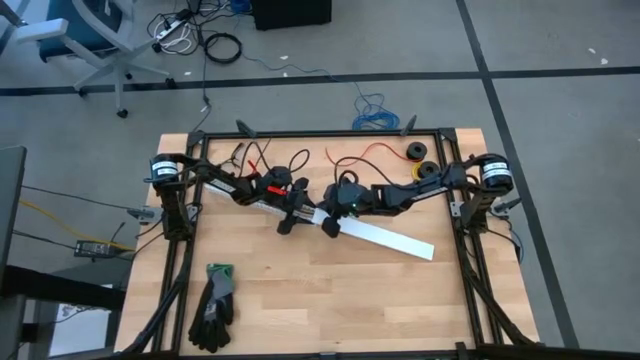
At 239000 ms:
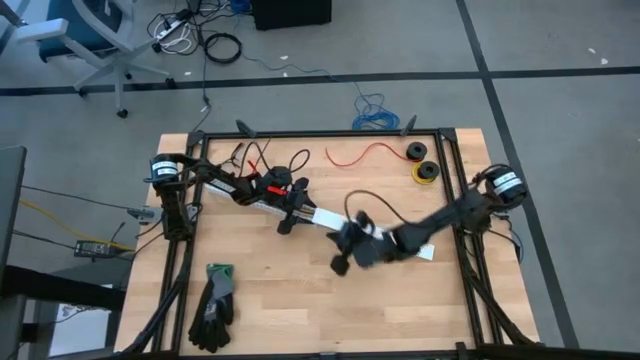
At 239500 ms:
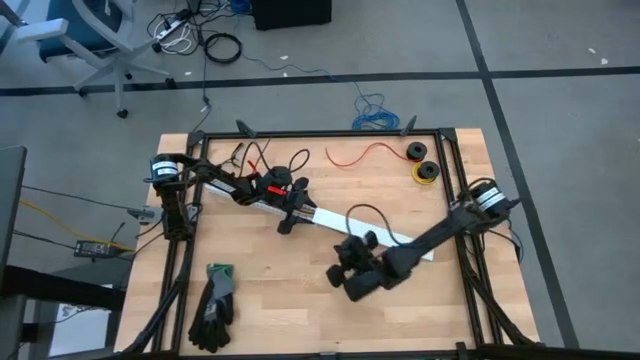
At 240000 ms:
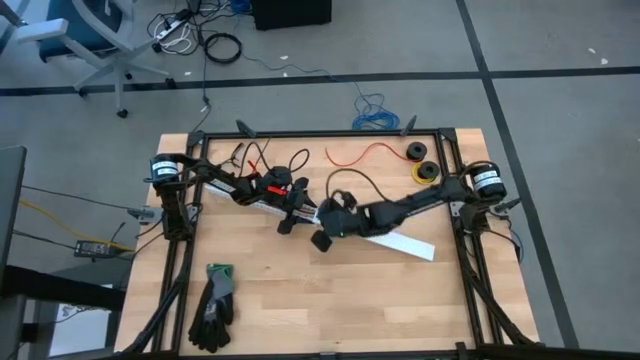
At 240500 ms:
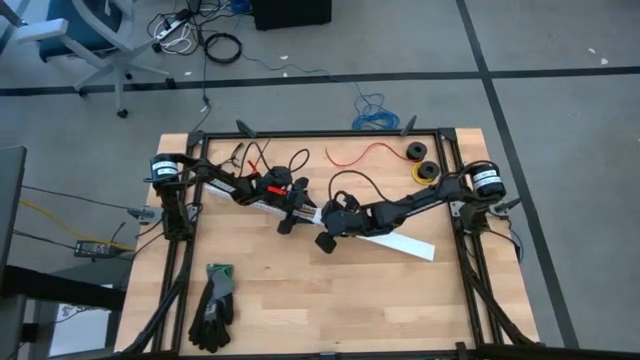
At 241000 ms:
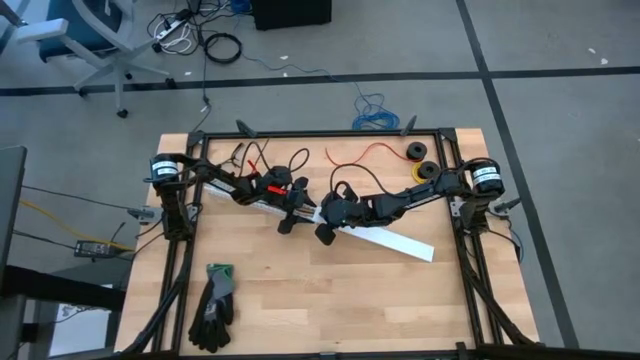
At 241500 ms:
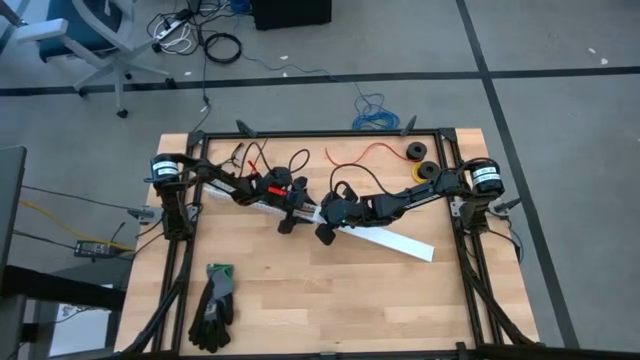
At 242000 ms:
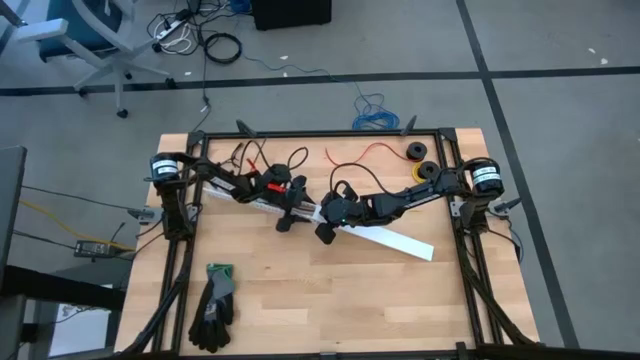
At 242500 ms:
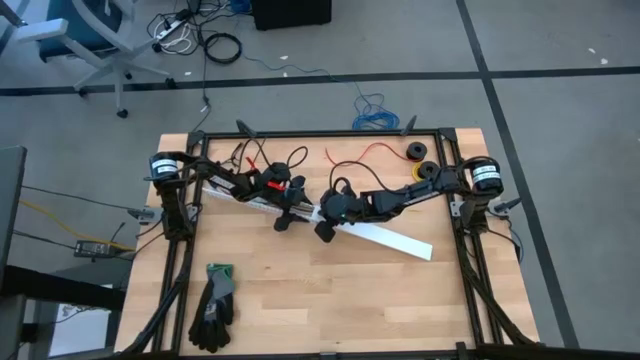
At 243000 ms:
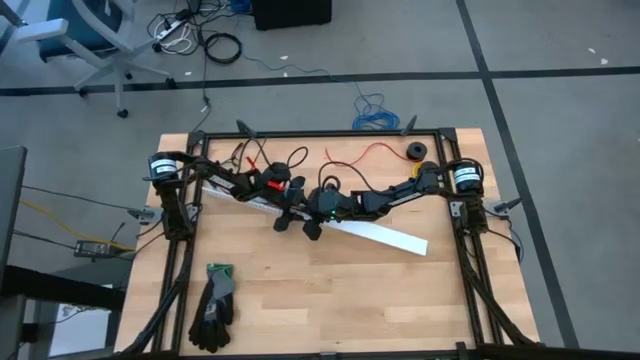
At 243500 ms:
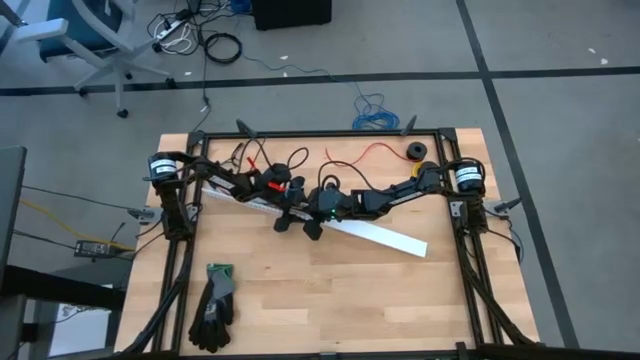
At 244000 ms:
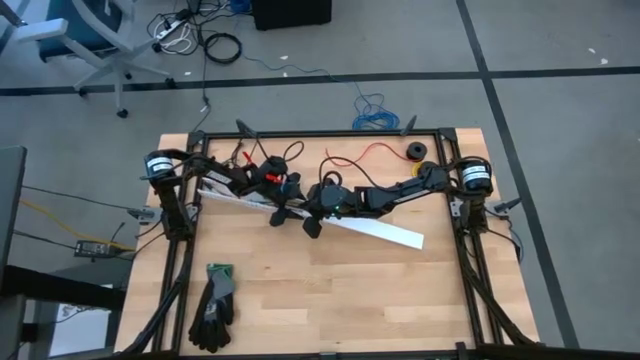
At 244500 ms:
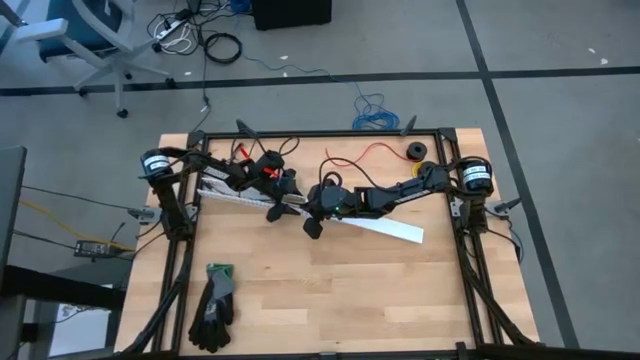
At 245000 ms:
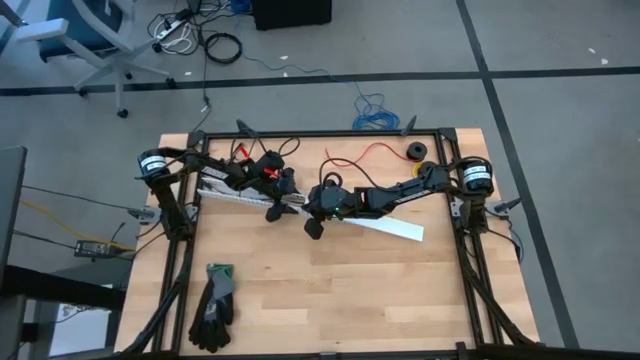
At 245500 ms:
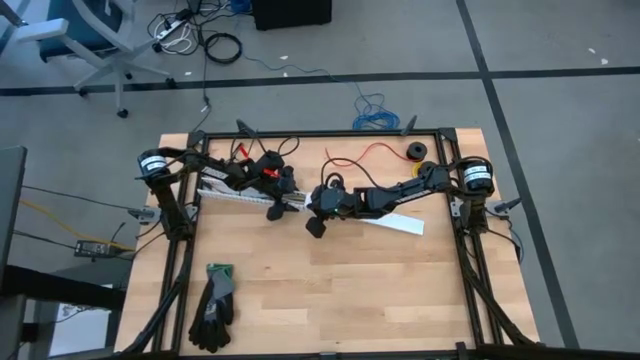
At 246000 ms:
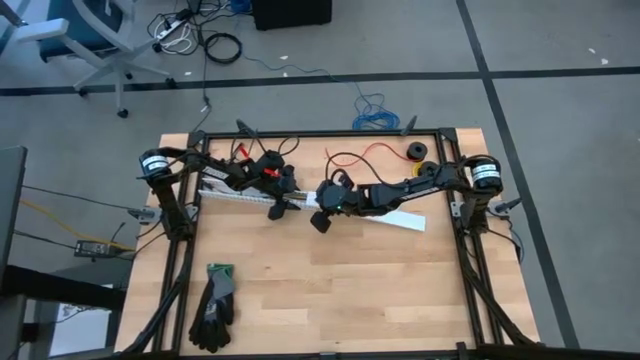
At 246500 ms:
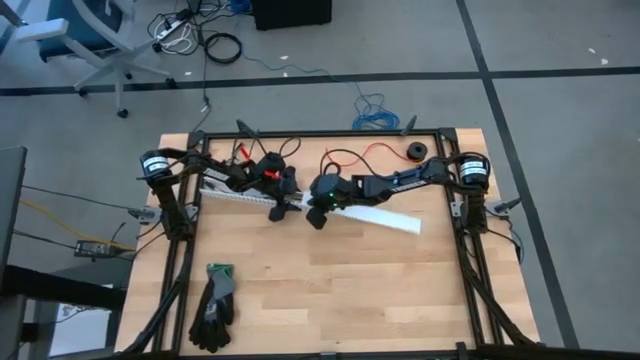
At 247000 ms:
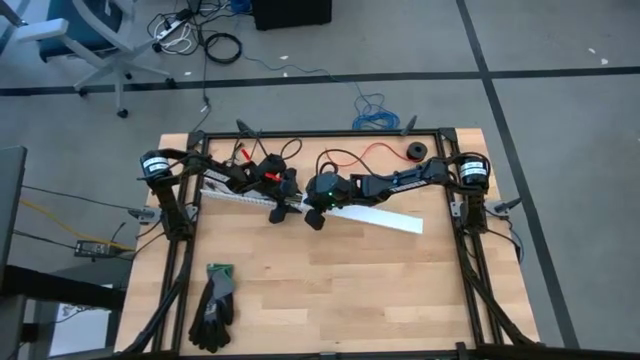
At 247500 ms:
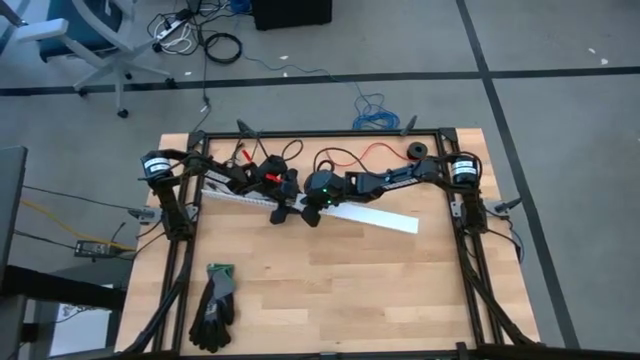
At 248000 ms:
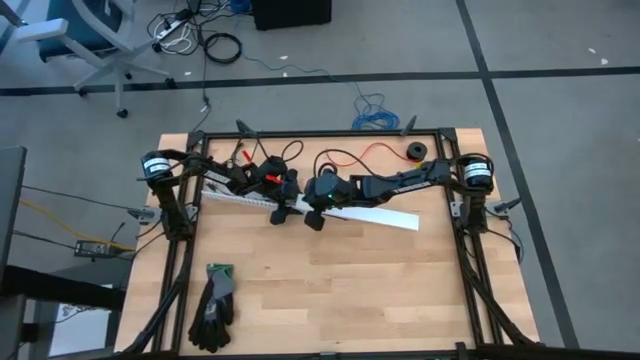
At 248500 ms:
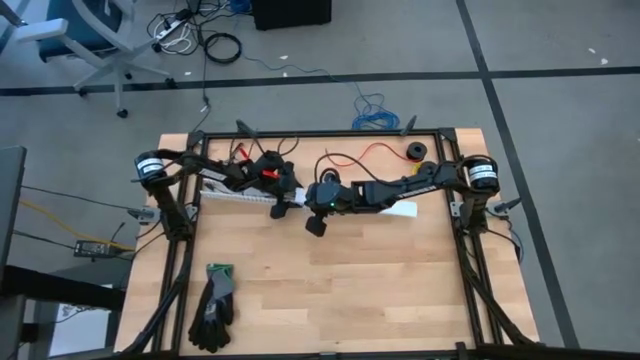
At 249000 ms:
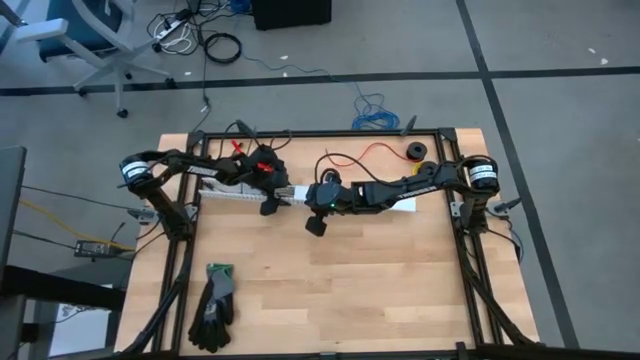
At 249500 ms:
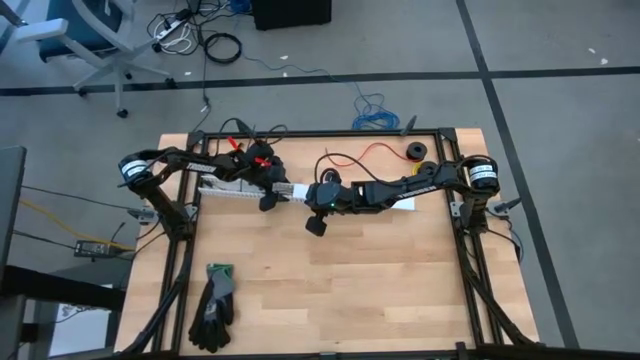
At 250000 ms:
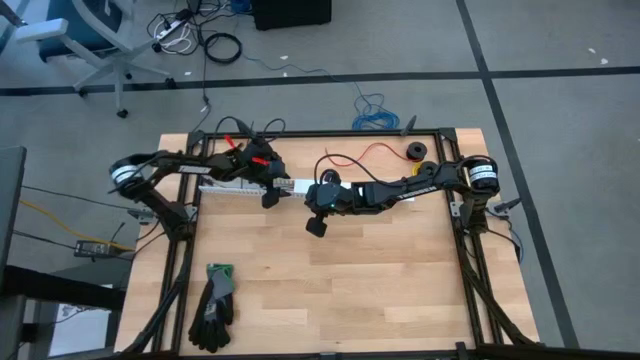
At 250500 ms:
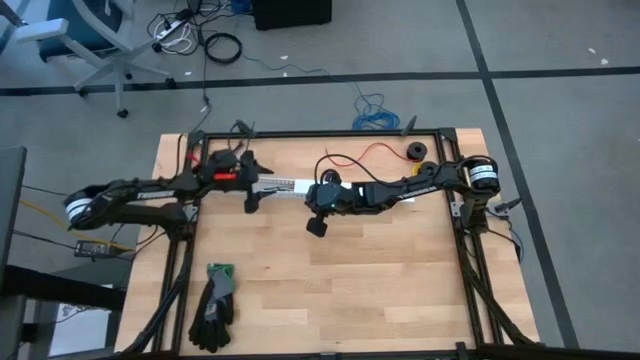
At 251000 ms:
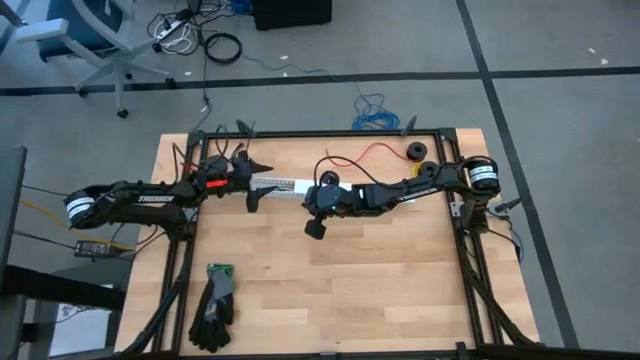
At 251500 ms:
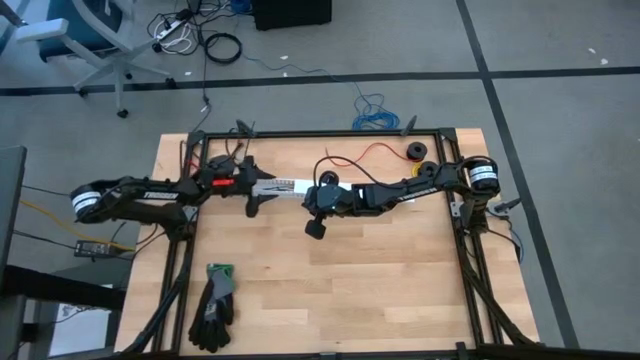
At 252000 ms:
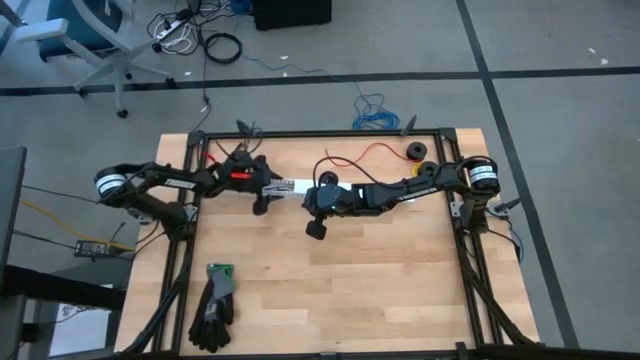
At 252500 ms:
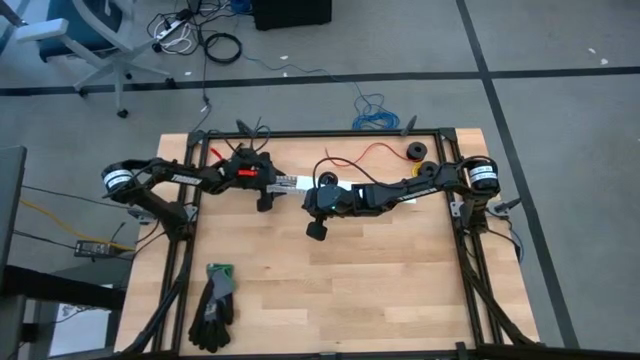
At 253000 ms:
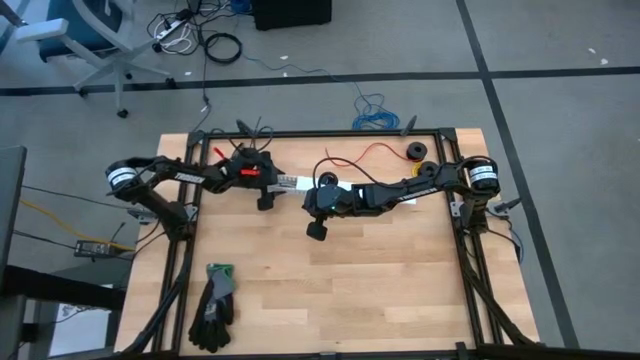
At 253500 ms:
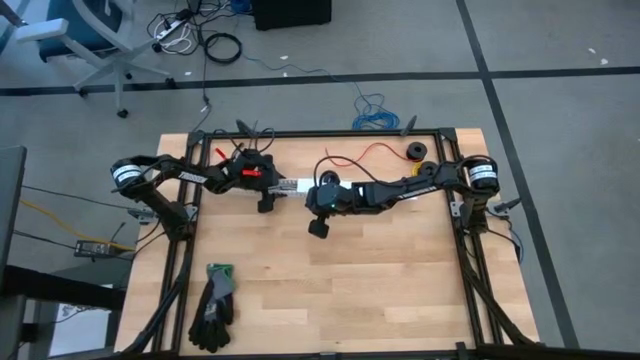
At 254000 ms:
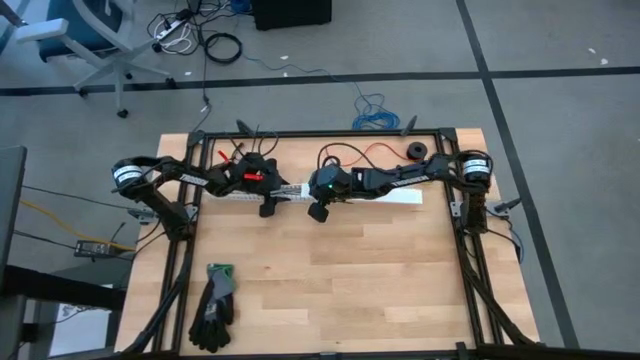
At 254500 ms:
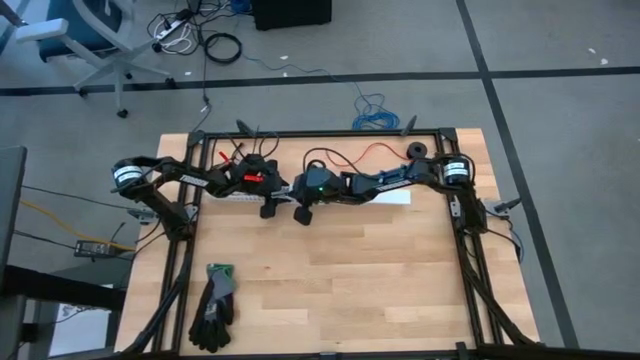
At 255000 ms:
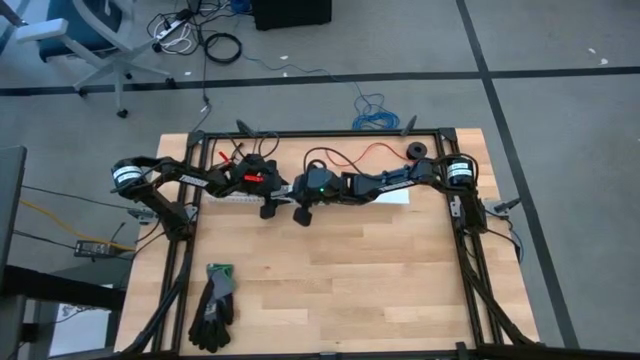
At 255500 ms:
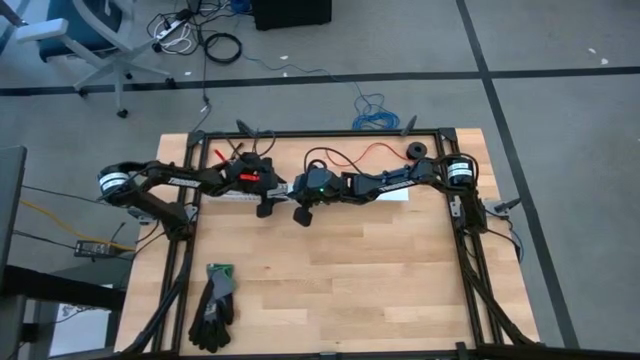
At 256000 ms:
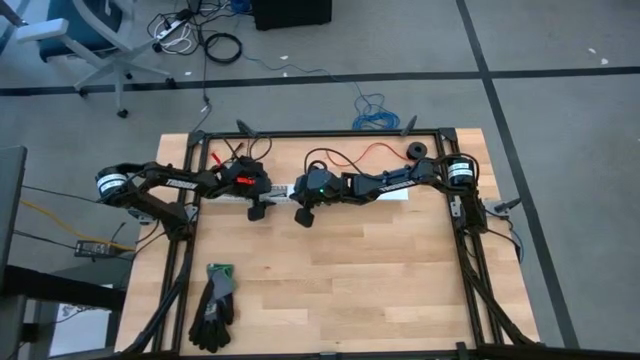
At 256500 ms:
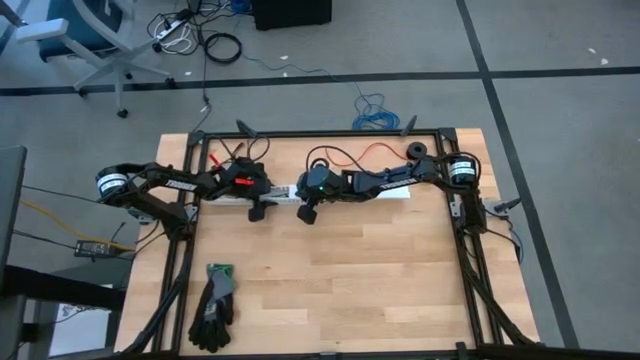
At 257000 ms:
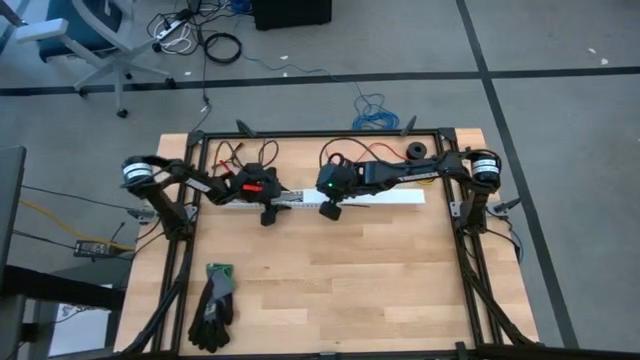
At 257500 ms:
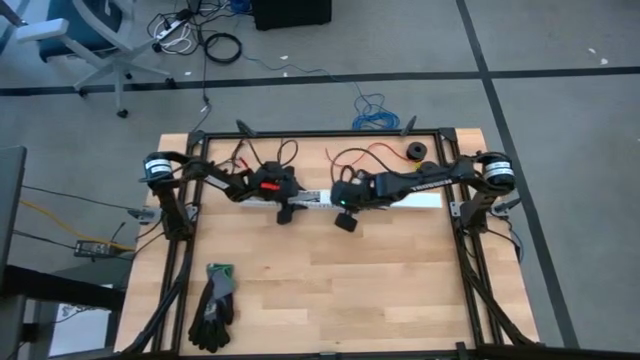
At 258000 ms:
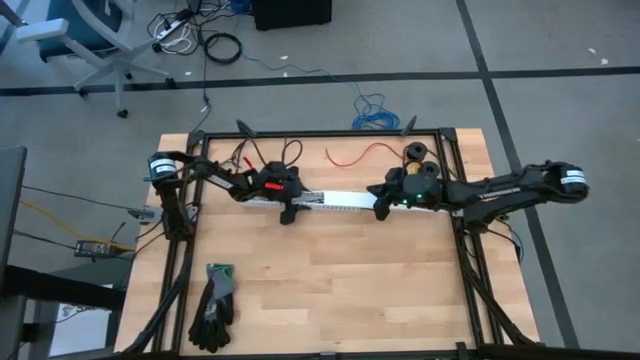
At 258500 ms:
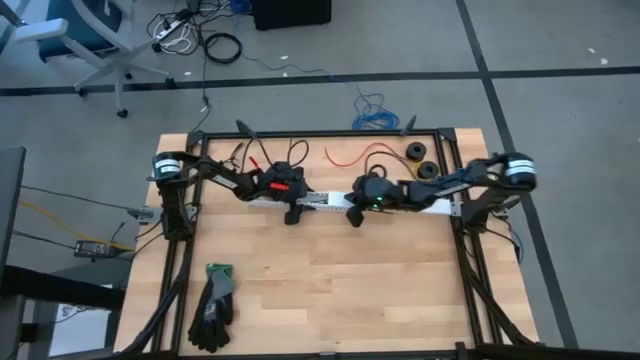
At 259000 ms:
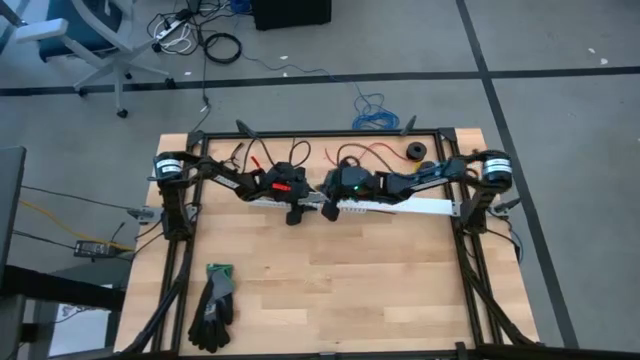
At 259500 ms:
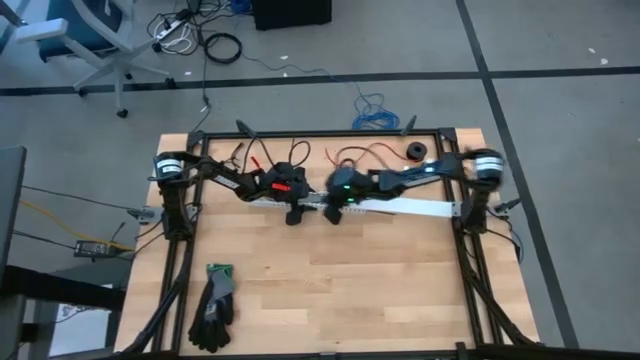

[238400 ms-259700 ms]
Task: Ziptie cables
Close the cable duct with the cable duct lid

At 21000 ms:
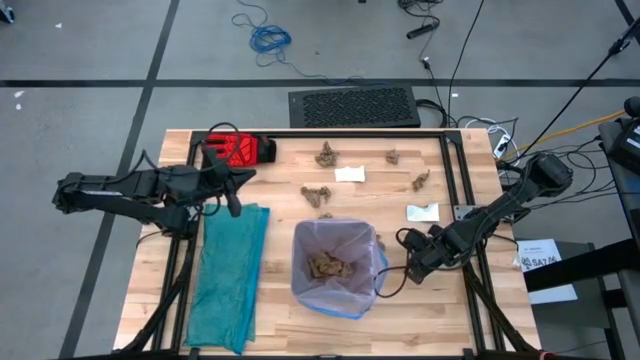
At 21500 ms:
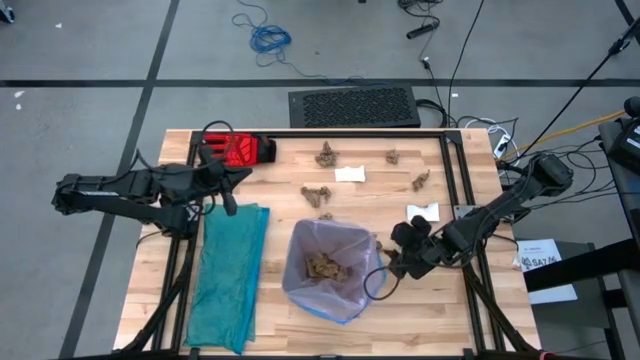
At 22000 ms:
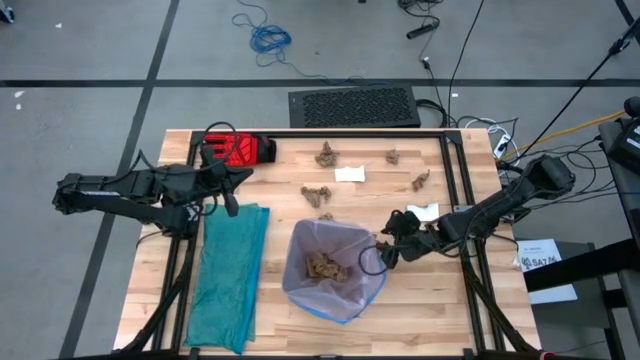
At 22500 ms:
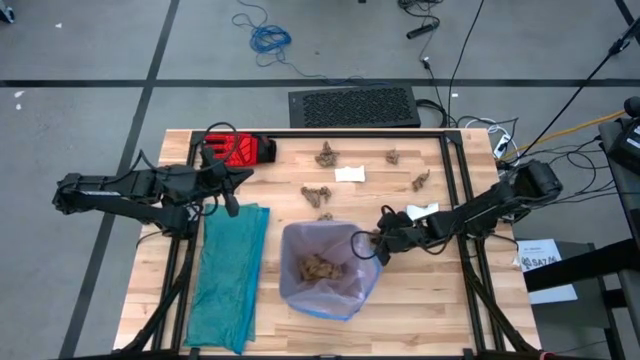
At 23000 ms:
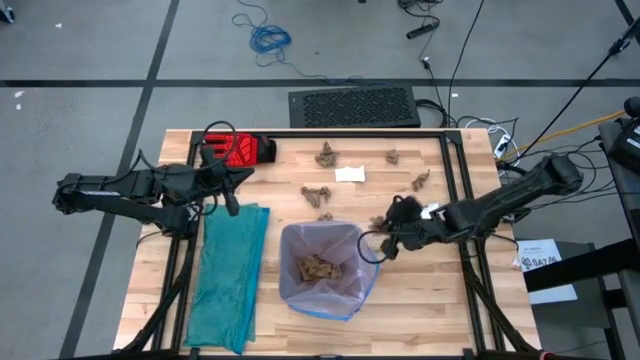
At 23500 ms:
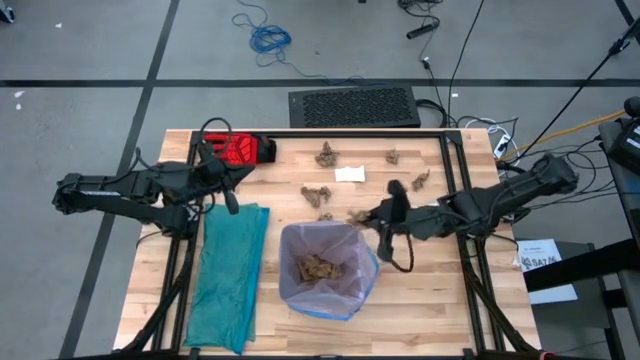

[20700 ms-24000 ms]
Task: place trash/remove bag and relplace
Put the brown napkin into the black trash bin
